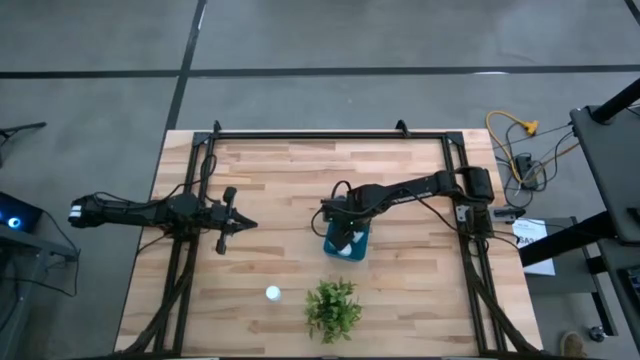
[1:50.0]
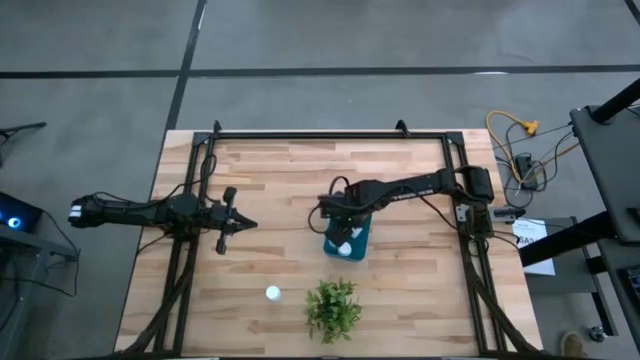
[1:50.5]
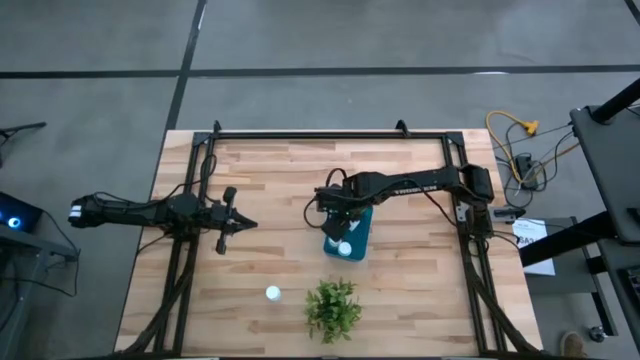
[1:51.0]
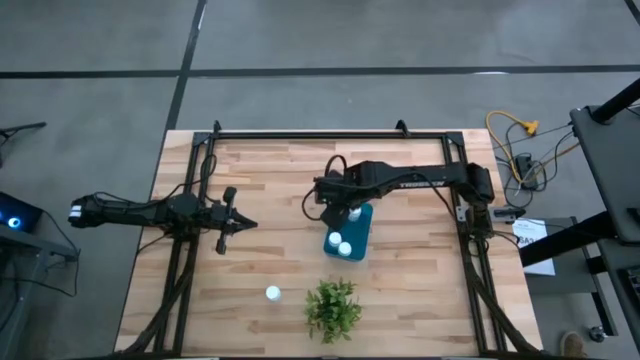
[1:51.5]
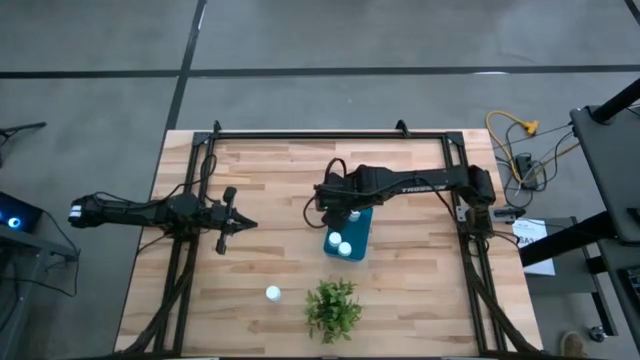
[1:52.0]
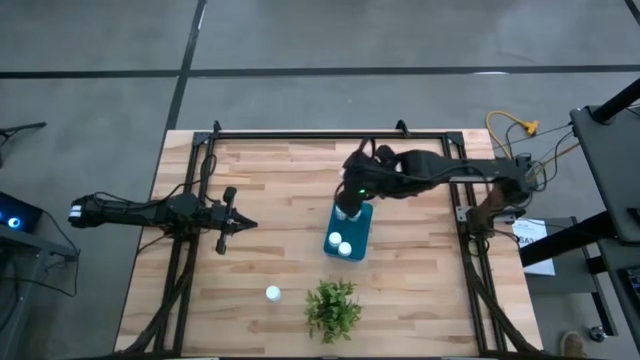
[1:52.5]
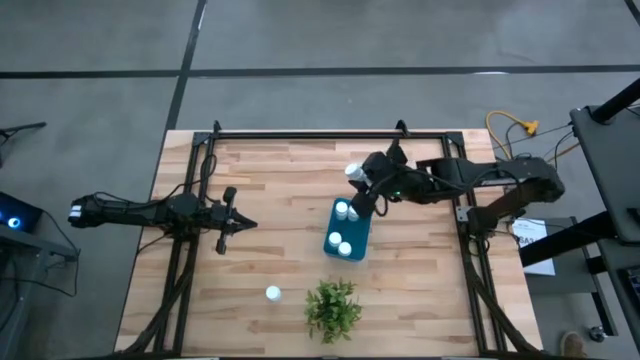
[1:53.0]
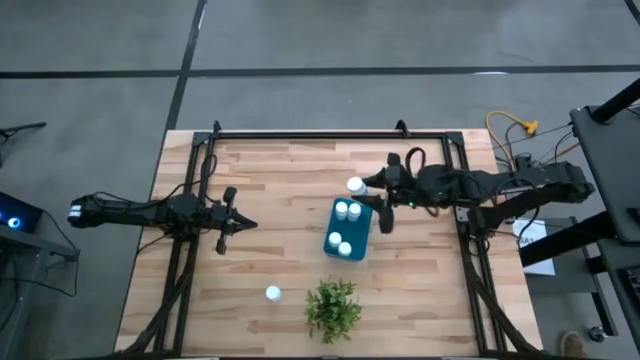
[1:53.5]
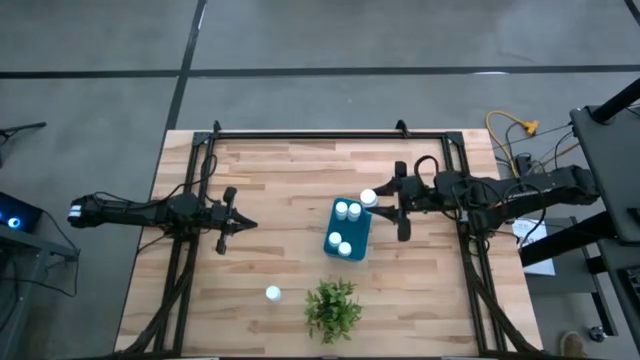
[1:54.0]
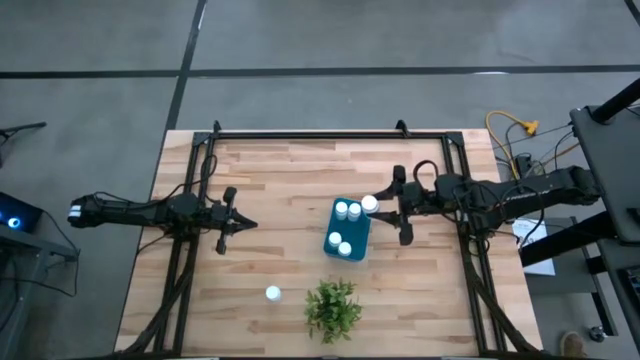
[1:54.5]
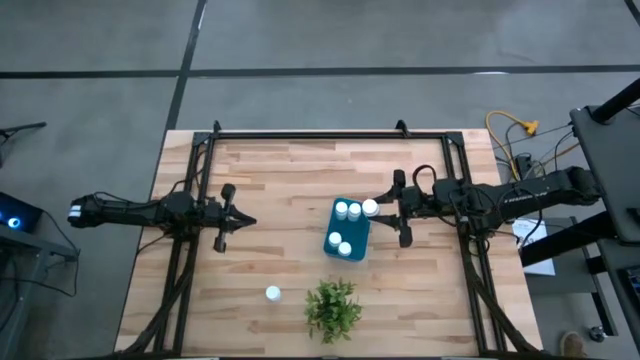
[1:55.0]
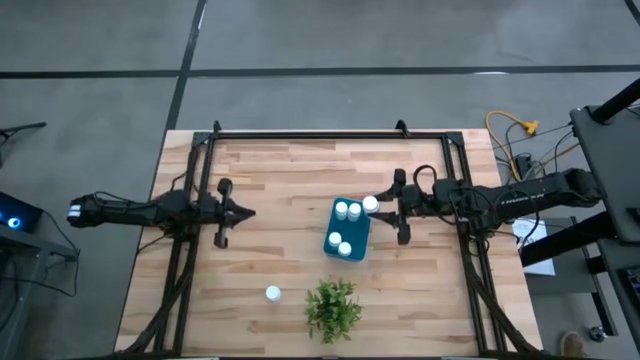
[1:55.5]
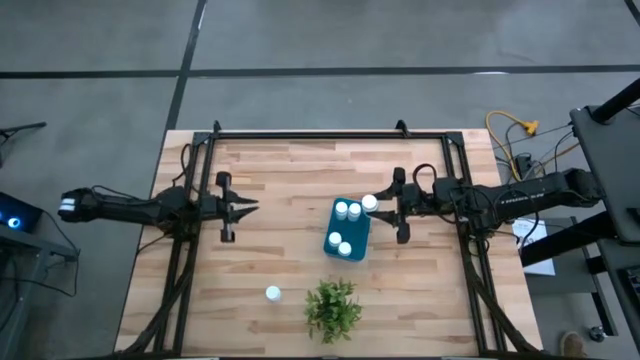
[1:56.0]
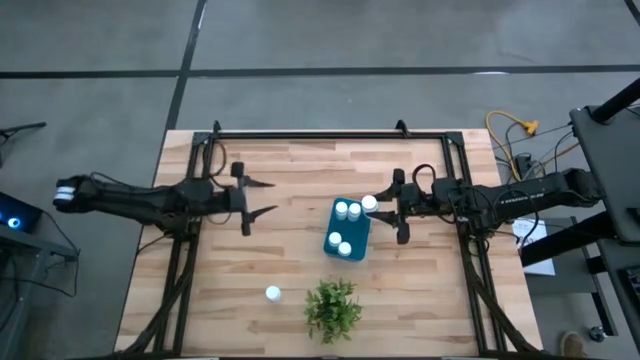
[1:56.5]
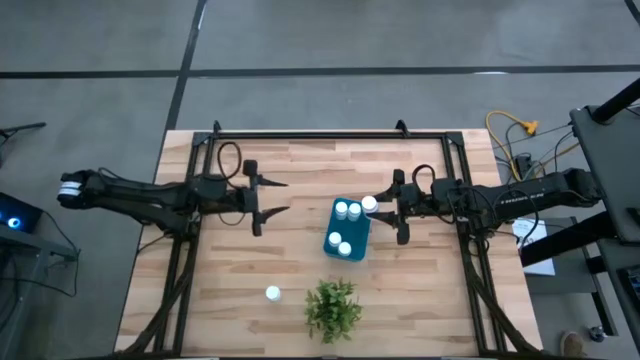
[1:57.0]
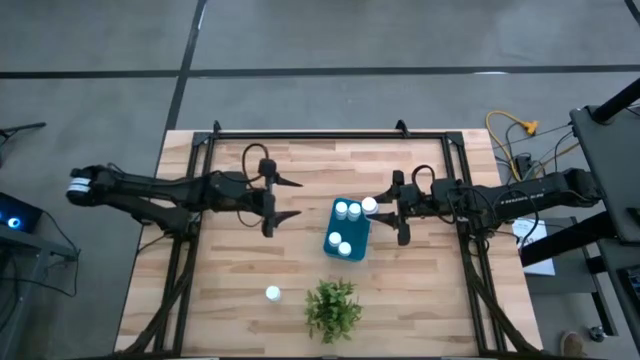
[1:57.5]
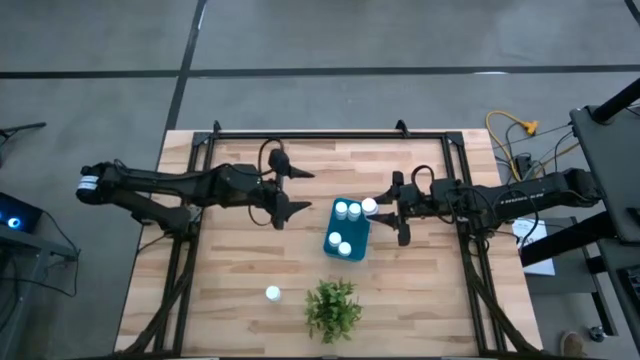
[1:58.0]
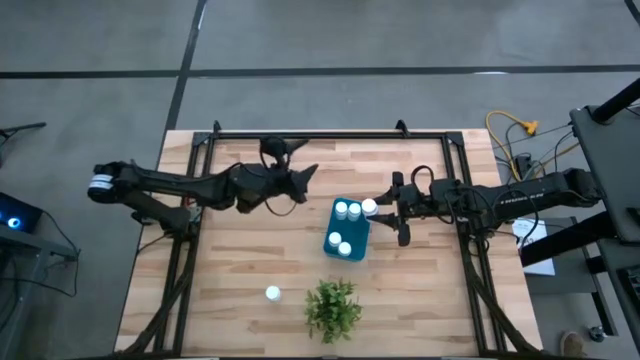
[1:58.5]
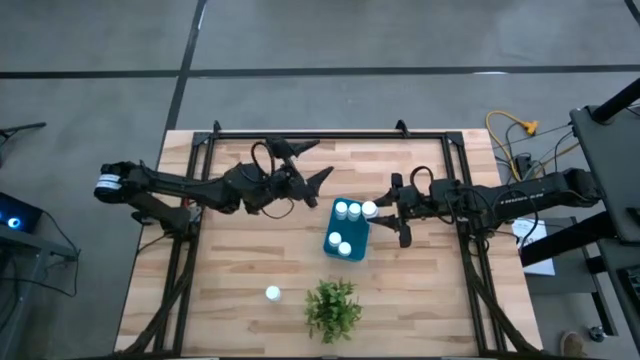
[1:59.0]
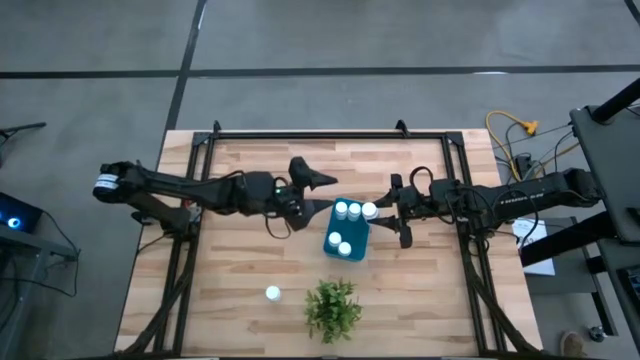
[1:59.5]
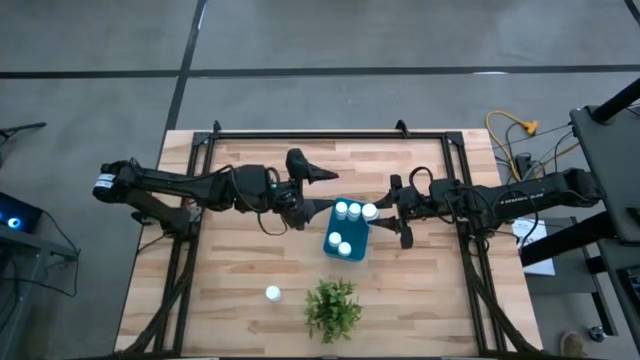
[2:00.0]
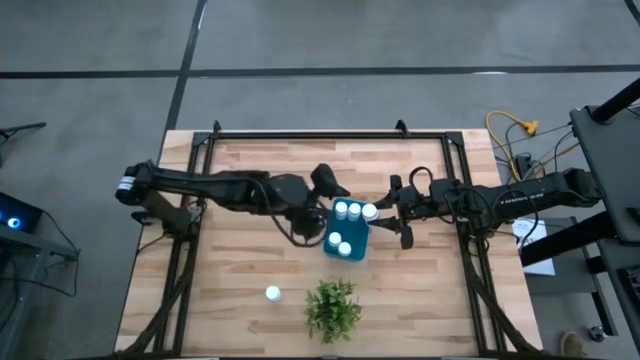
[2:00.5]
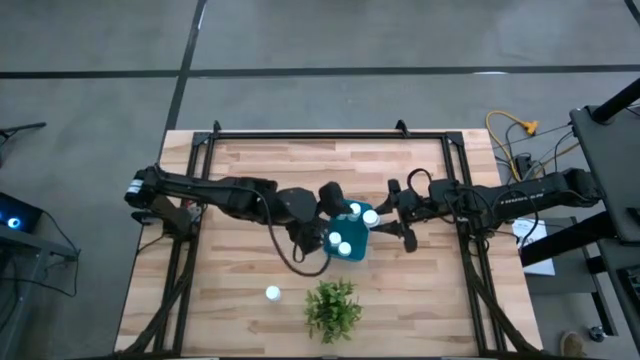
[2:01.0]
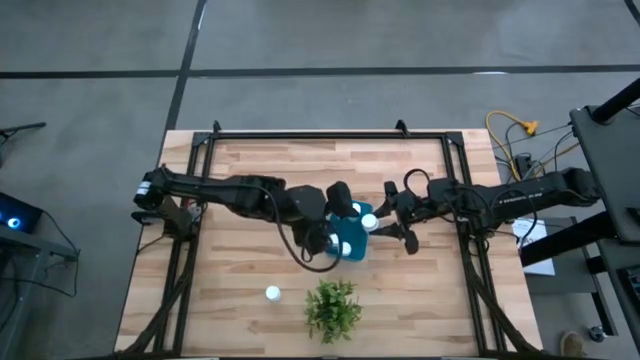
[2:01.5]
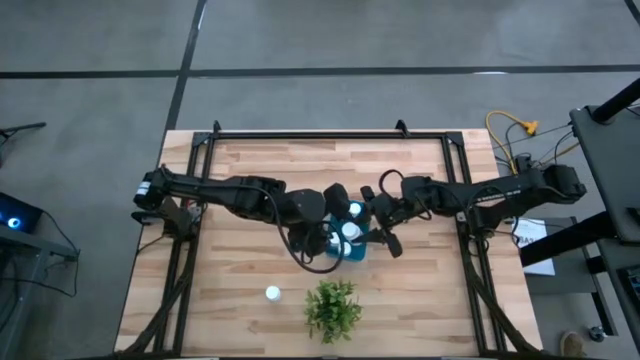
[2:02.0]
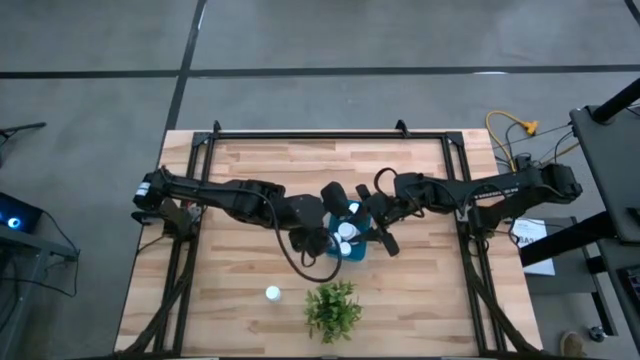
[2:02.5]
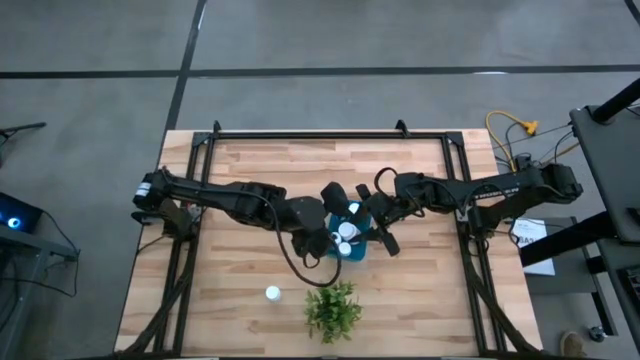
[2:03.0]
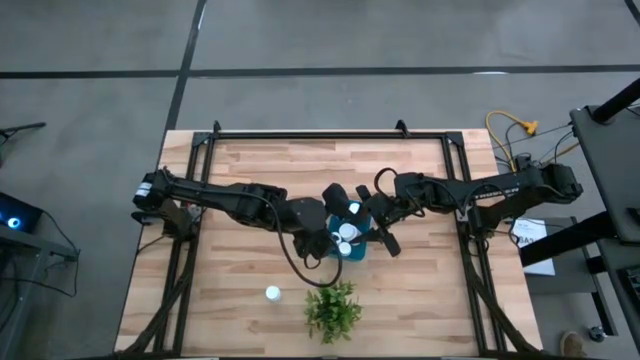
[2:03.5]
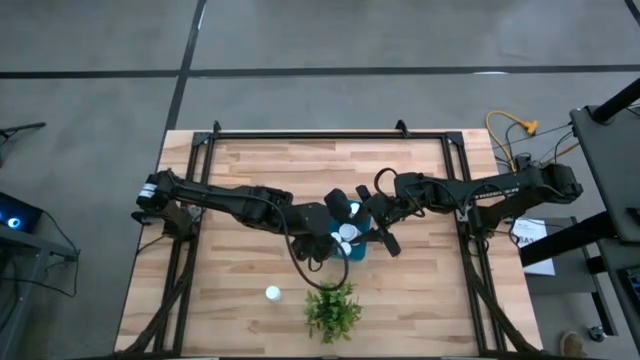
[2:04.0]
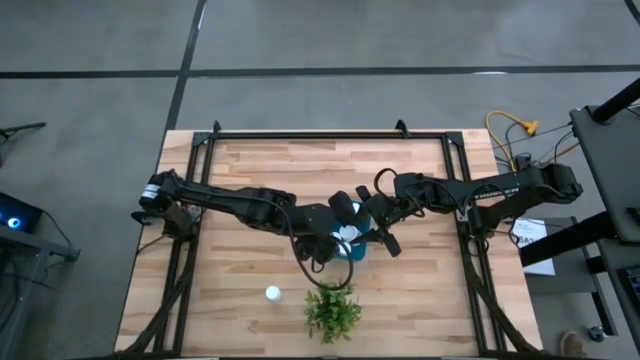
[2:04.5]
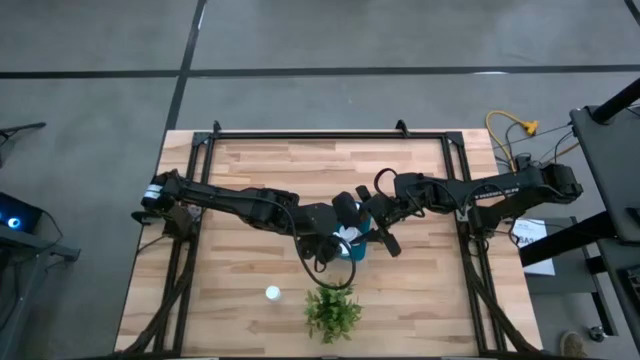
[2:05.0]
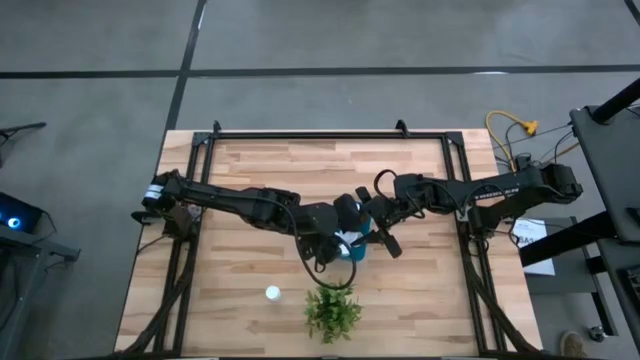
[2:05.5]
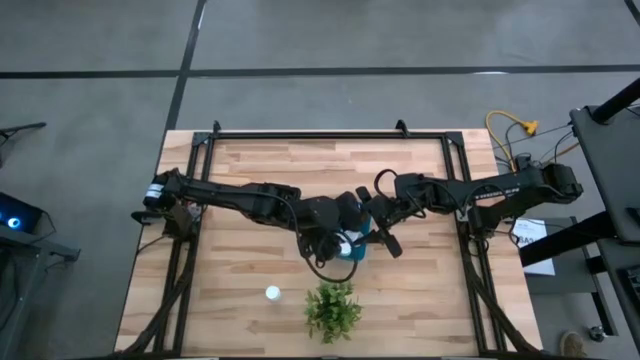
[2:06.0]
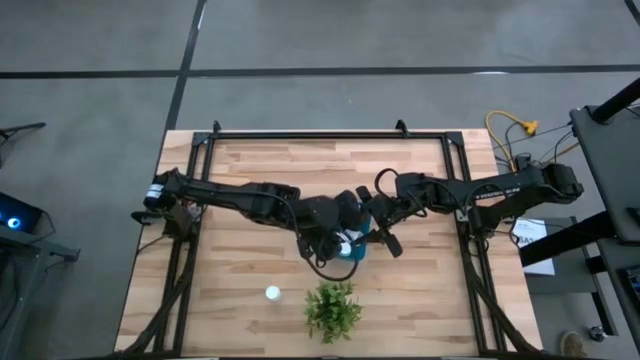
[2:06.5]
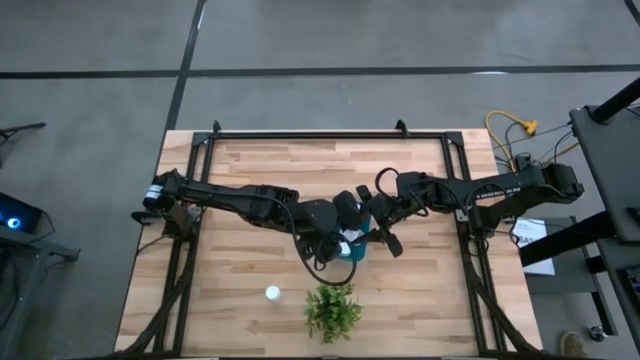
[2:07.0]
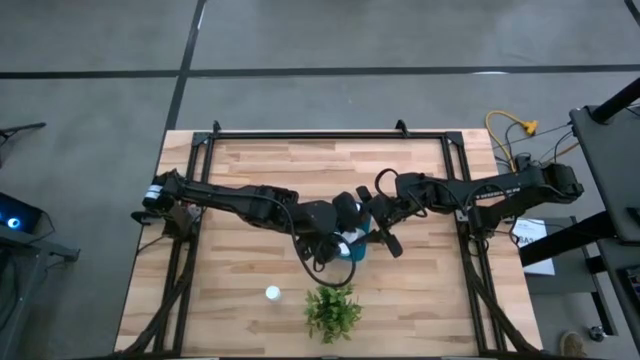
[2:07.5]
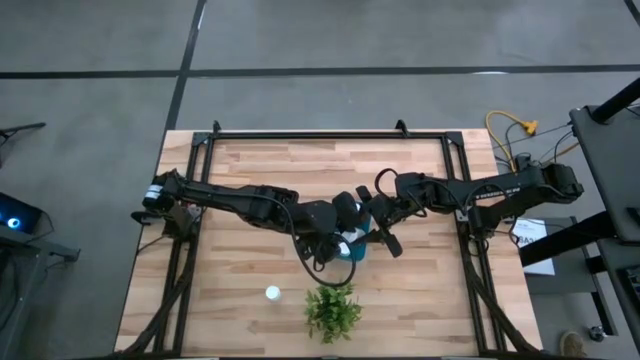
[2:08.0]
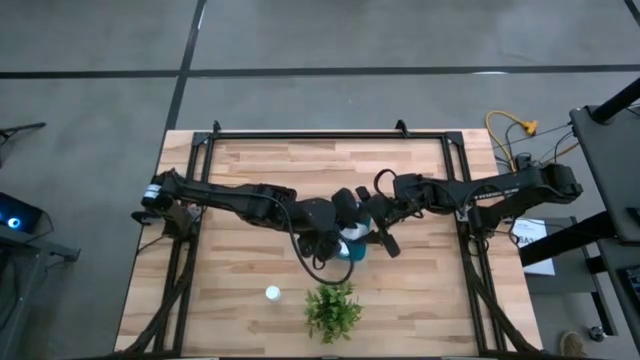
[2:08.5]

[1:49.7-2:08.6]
Task: Pick and place pill bottles into a basket
Put the white pill bottle into the blue bin

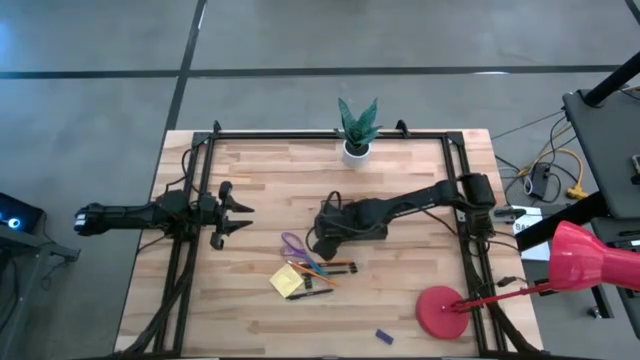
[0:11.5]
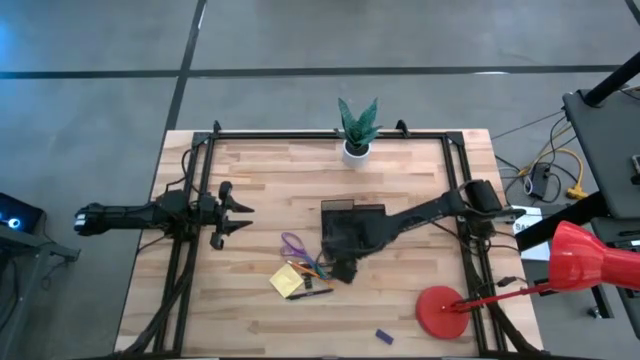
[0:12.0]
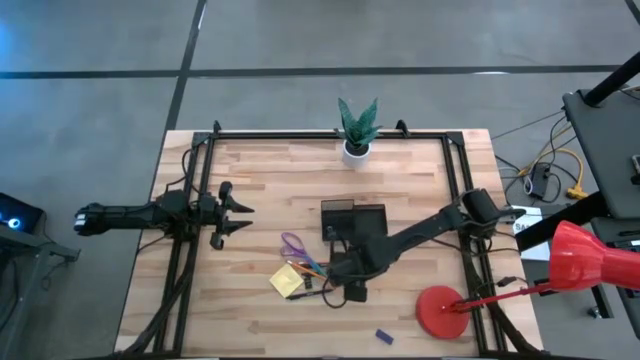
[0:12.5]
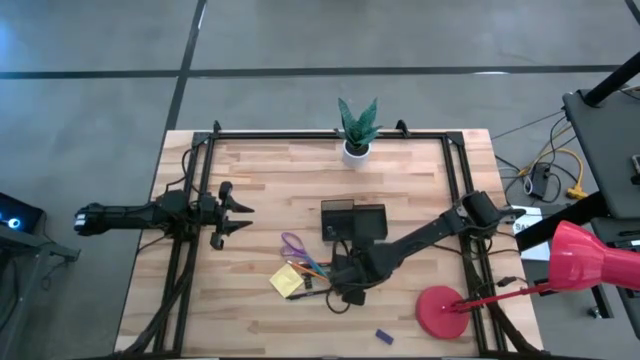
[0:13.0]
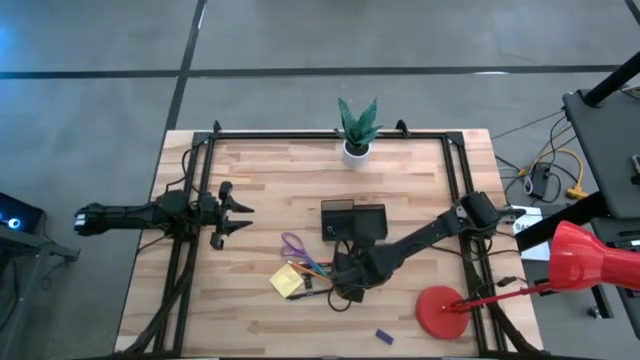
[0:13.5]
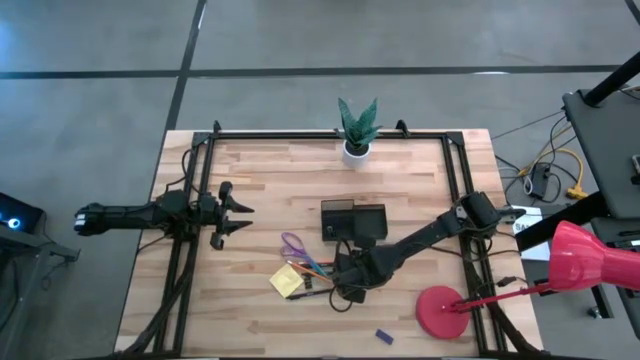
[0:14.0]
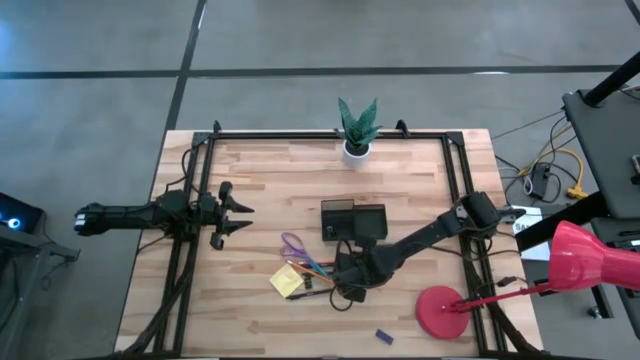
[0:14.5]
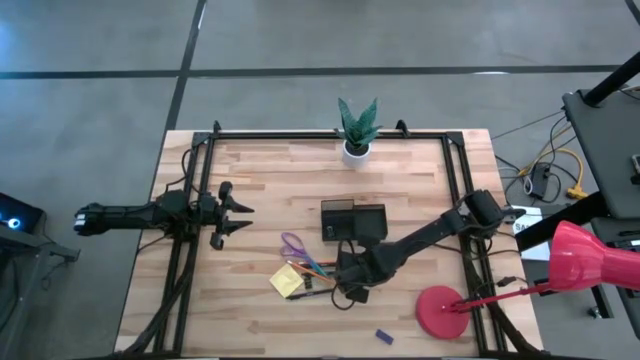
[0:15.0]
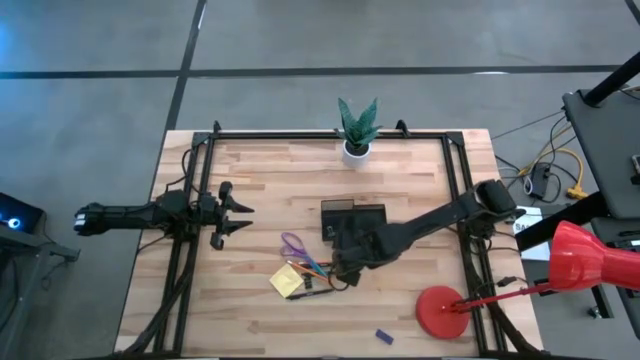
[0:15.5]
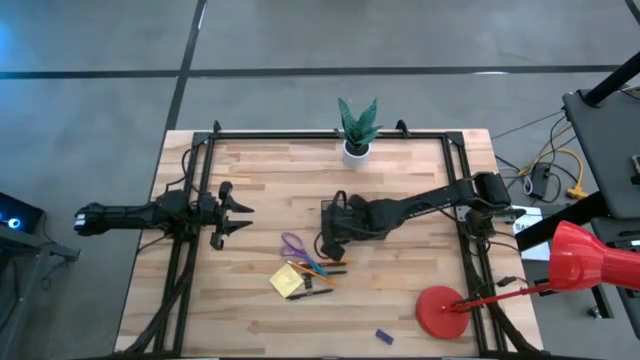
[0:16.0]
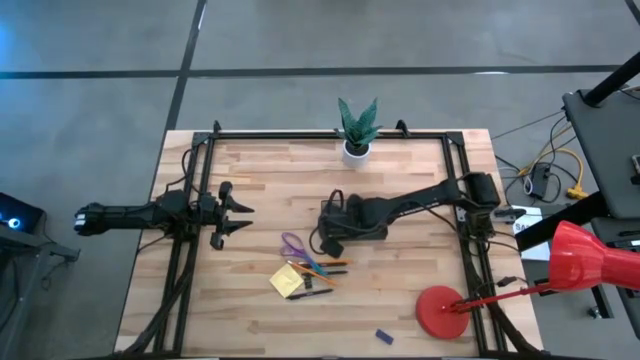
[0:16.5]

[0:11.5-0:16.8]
Task: Pick and place office supplies into organizer
Put the top black clip into the black organizer
